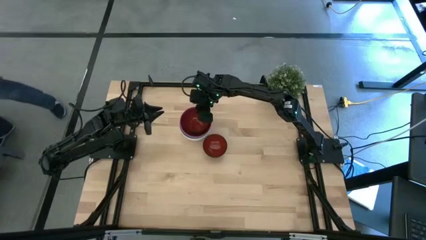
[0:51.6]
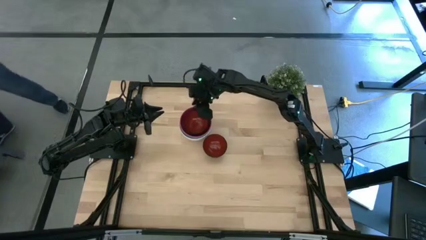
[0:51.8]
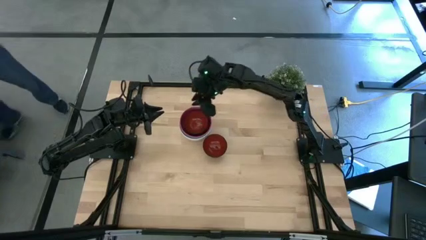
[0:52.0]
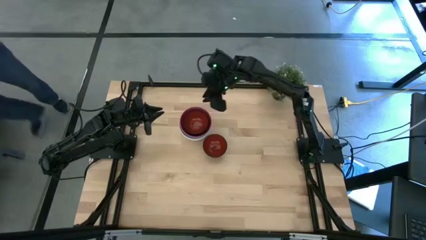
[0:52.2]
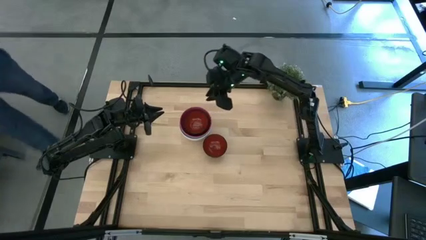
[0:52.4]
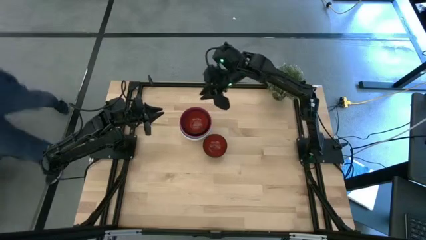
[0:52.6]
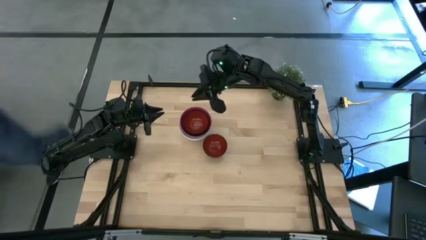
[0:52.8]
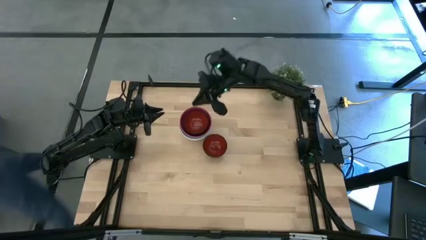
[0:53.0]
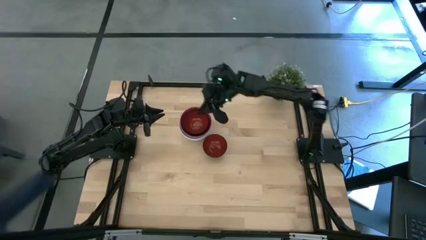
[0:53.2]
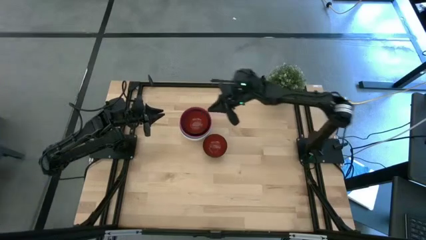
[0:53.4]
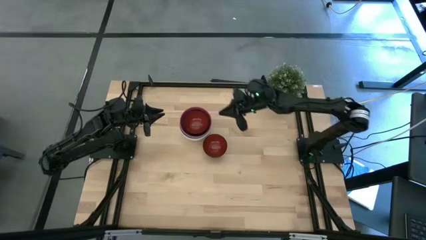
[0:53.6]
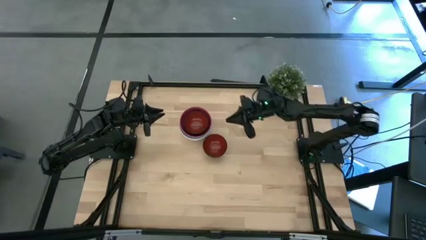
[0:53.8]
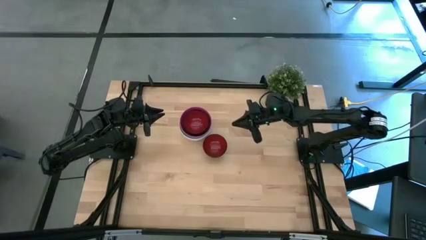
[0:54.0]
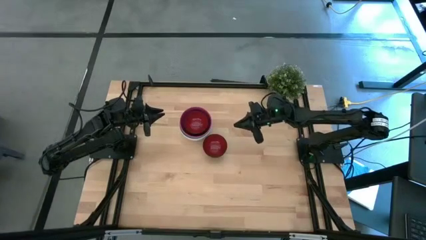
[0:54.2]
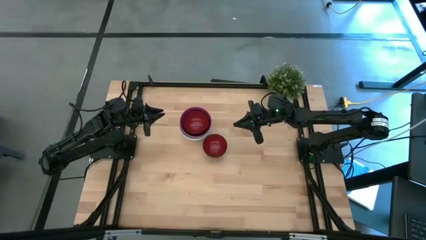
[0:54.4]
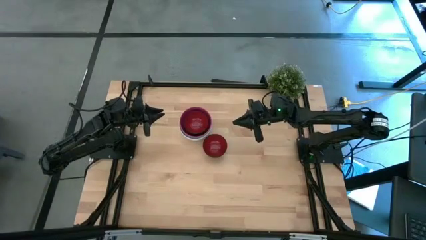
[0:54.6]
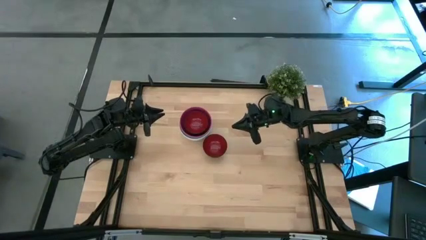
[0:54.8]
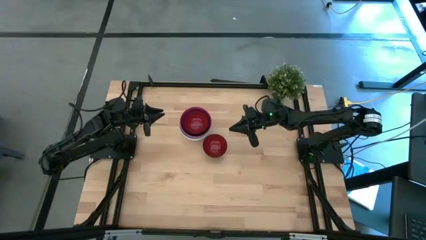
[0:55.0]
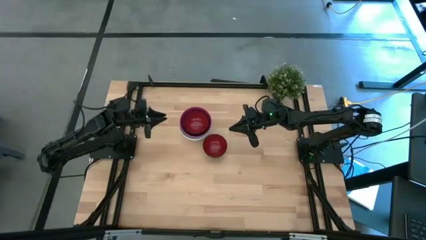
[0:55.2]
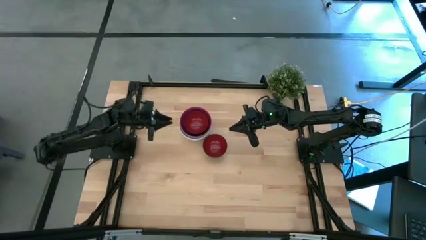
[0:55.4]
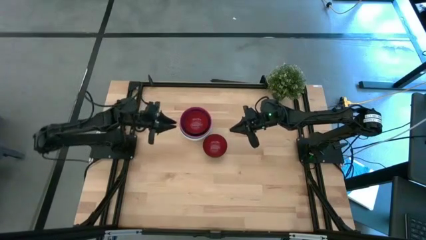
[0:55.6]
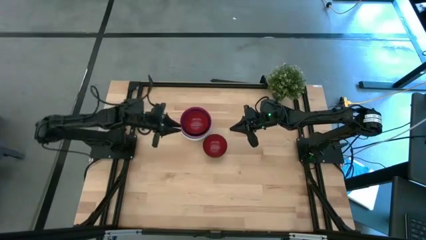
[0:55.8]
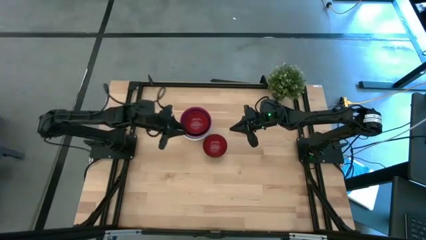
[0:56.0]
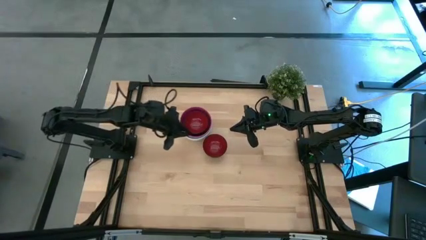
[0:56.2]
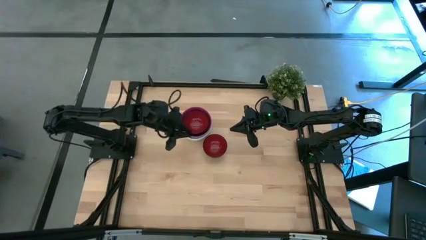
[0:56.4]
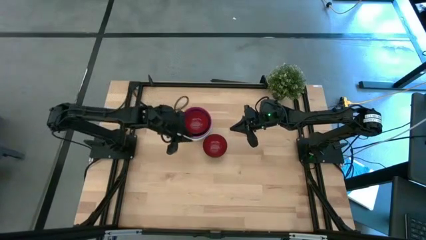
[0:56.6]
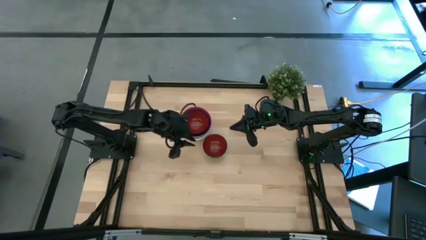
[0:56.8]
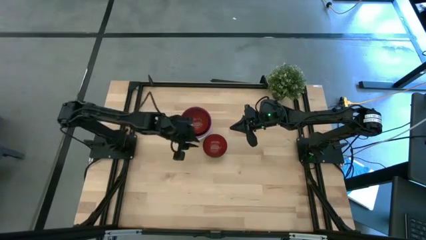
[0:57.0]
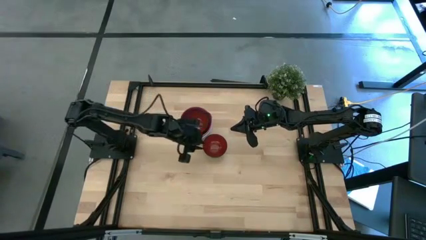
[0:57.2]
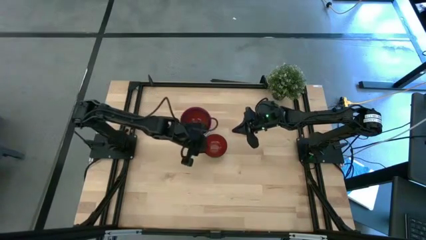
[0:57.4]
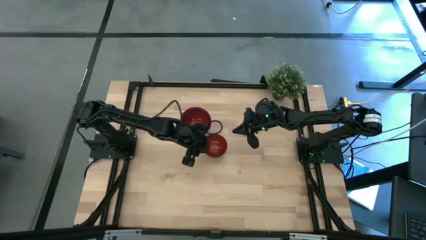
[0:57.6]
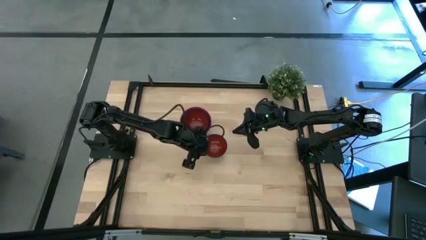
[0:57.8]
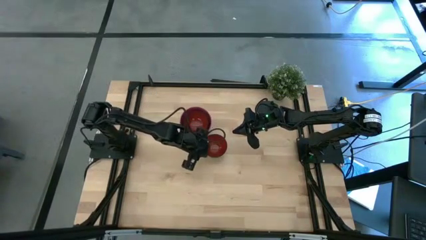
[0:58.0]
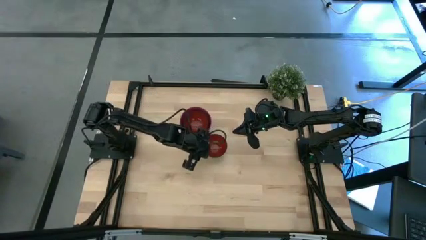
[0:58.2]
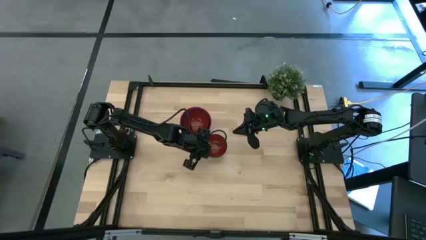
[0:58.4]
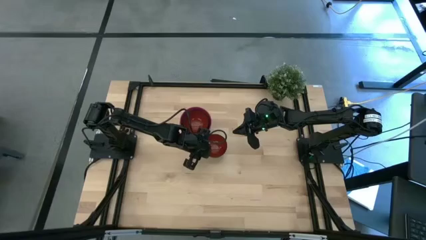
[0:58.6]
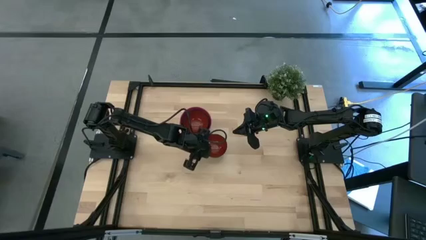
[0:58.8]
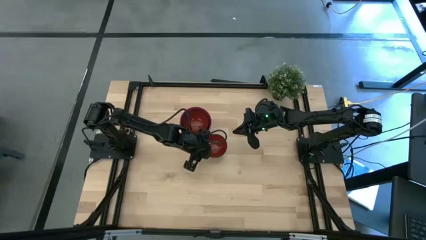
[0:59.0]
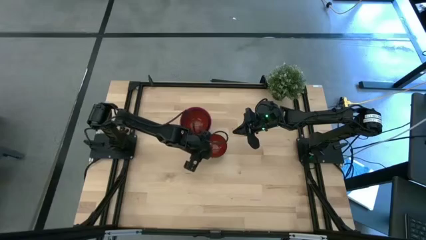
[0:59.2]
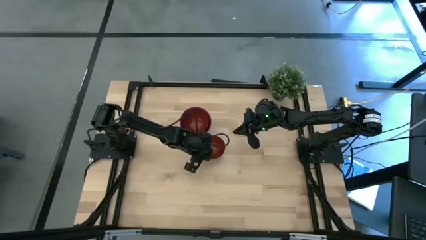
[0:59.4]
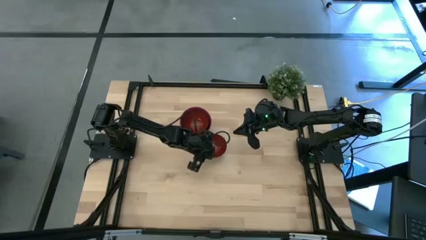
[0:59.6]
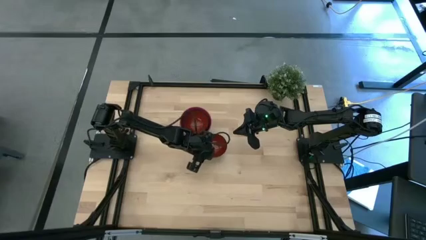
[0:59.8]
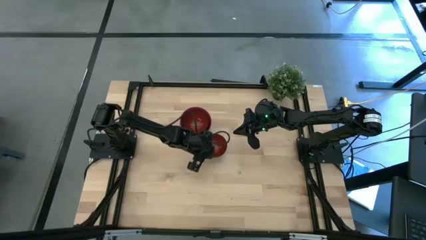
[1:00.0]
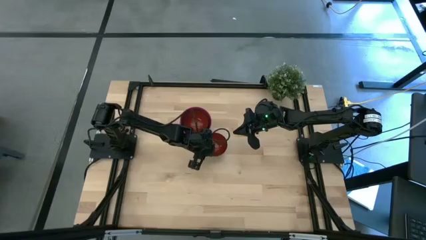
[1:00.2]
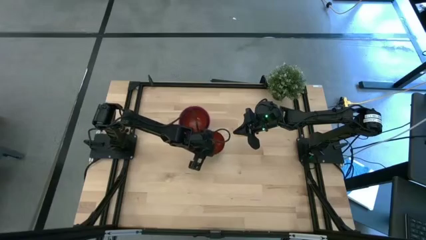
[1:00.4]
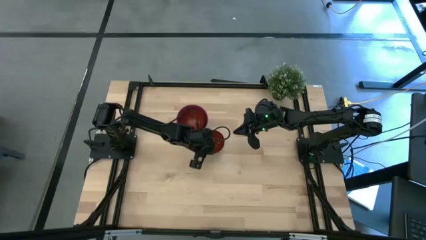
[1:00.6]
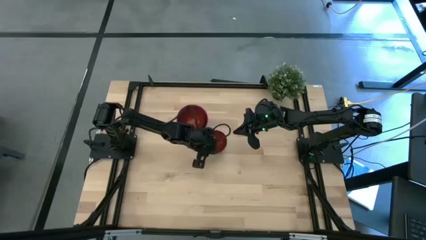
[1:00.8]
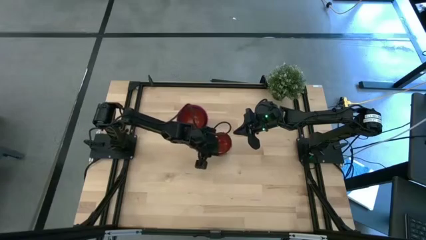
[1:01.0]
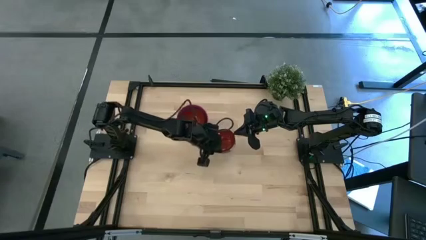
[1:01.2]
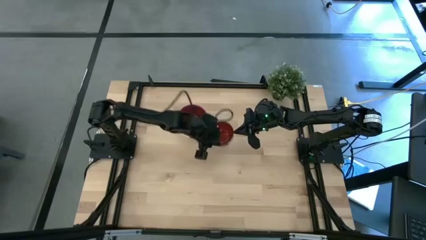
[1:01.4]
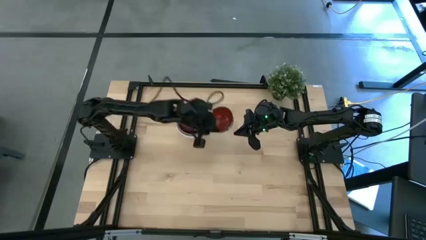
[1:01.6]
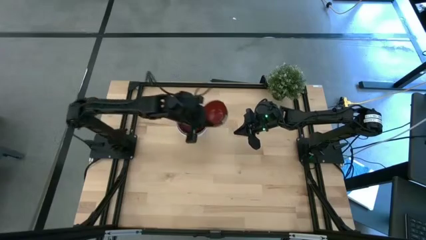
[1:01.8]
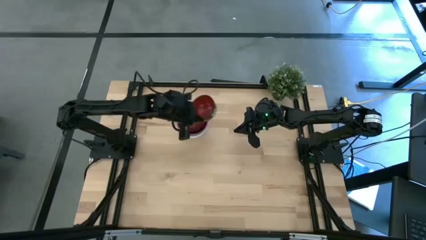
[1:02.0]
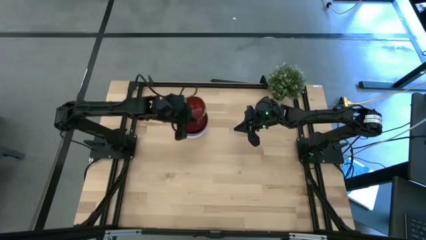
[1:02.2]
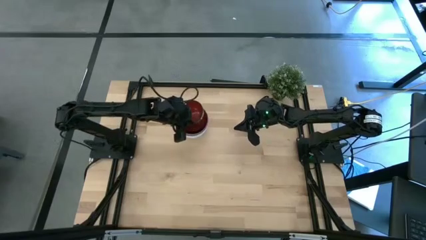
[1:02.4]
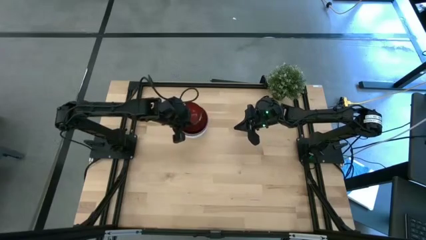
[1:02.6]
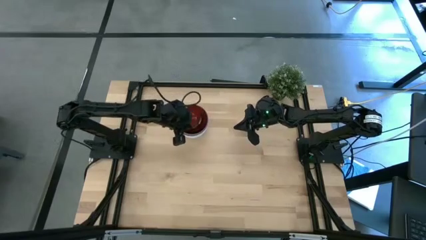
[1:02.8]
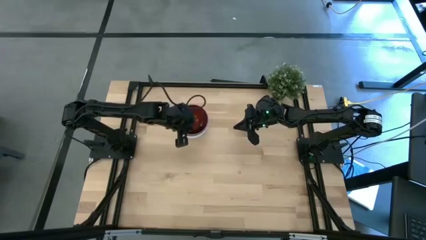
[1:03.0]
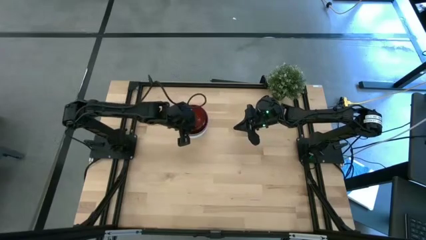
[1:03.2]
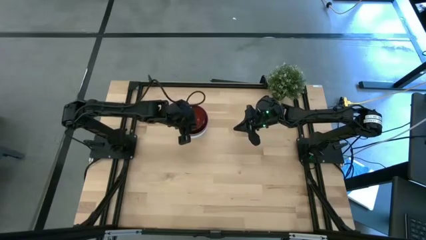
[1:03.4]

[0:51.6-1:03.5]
Task: Nest bowls inside each other
Stack the red bowl into the red bowl

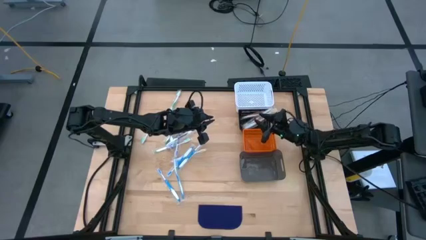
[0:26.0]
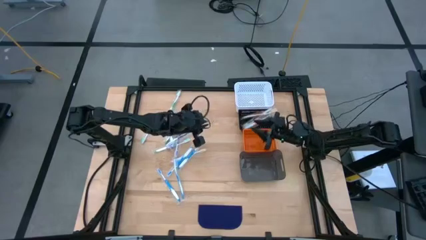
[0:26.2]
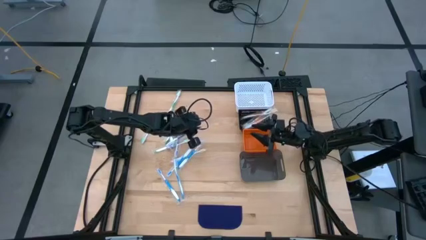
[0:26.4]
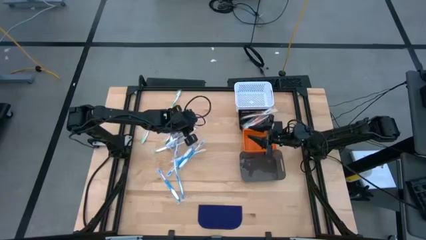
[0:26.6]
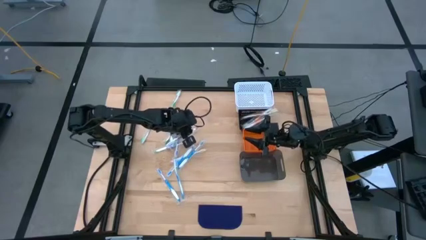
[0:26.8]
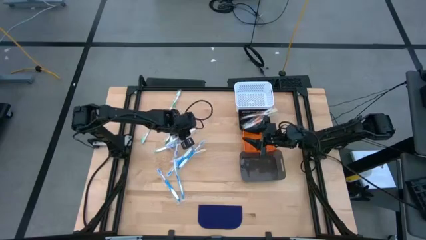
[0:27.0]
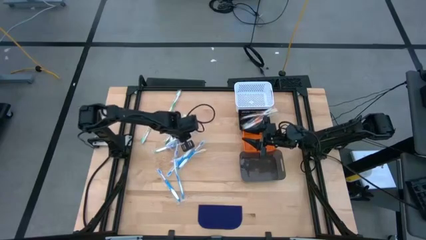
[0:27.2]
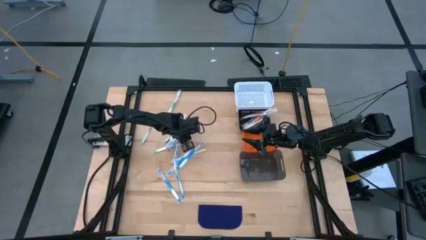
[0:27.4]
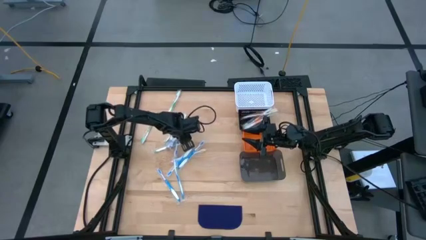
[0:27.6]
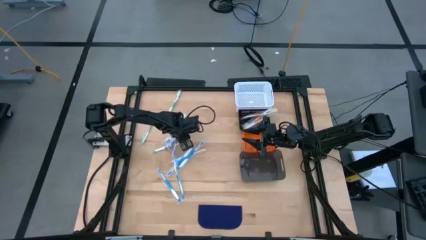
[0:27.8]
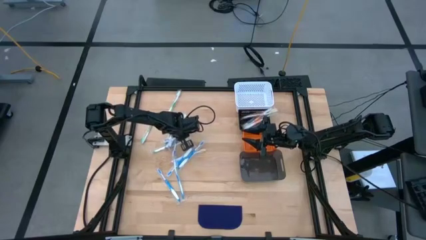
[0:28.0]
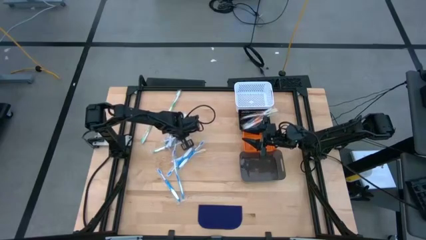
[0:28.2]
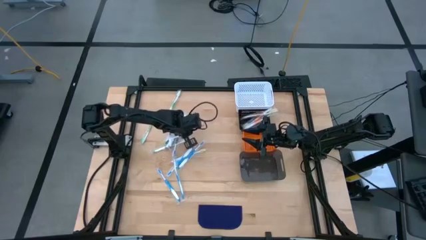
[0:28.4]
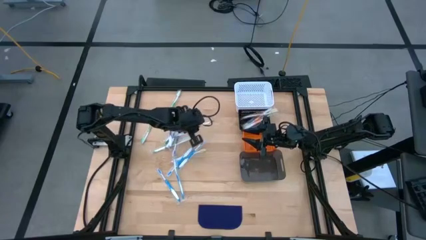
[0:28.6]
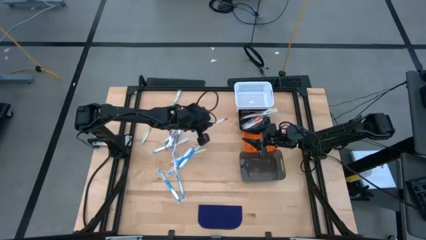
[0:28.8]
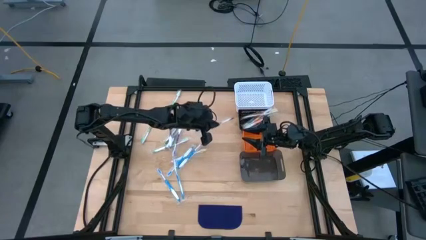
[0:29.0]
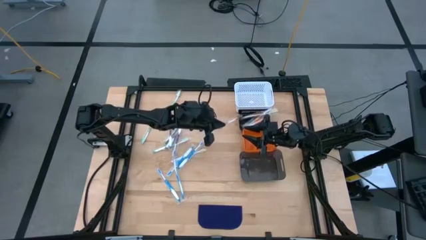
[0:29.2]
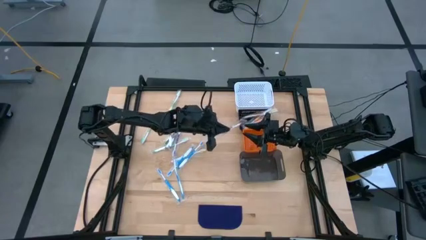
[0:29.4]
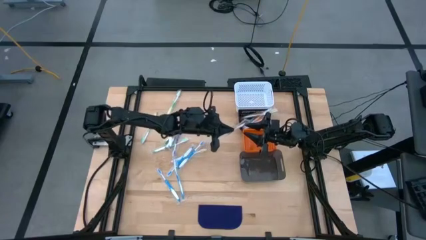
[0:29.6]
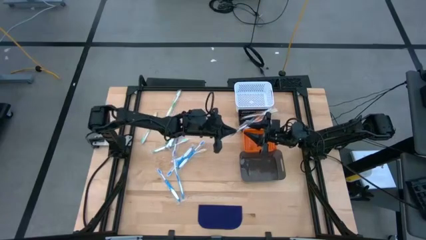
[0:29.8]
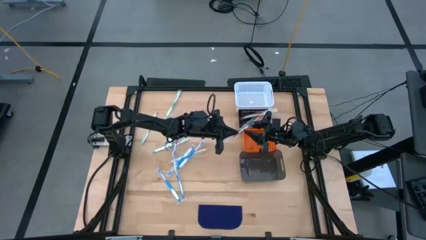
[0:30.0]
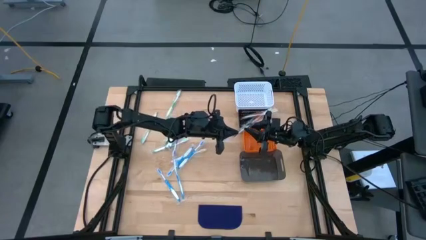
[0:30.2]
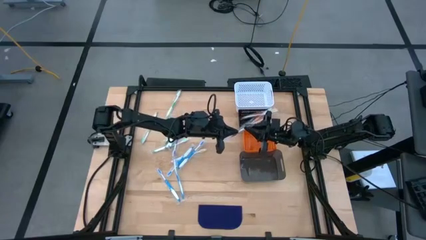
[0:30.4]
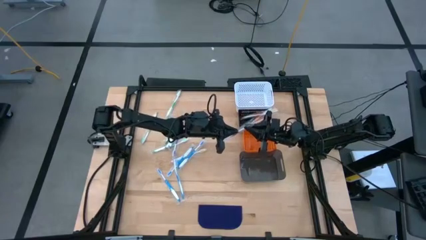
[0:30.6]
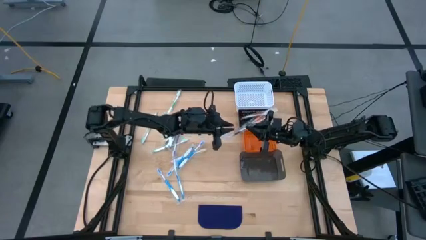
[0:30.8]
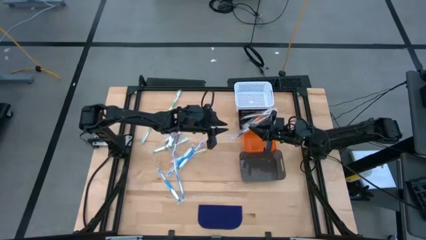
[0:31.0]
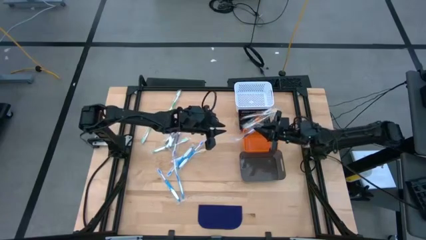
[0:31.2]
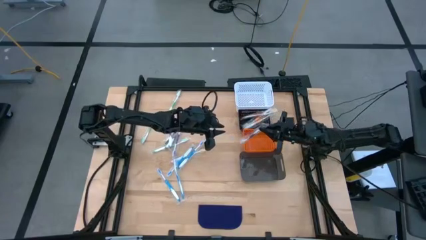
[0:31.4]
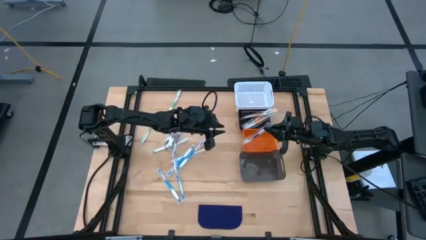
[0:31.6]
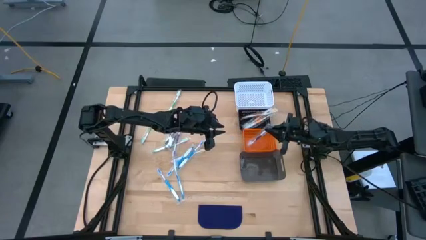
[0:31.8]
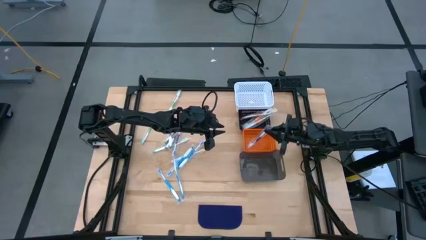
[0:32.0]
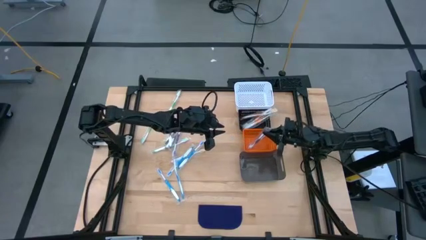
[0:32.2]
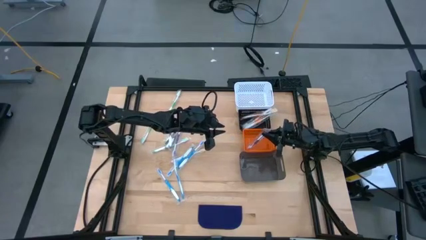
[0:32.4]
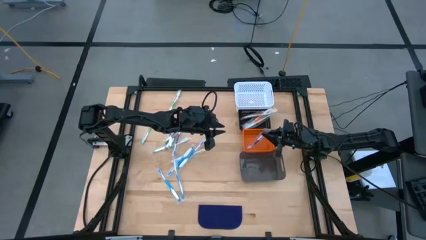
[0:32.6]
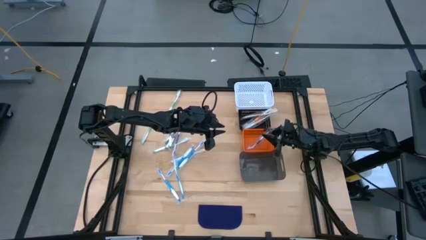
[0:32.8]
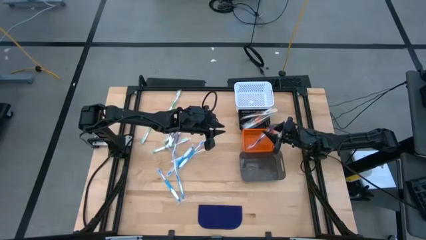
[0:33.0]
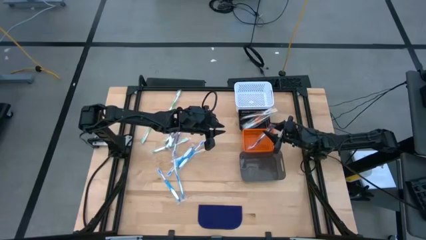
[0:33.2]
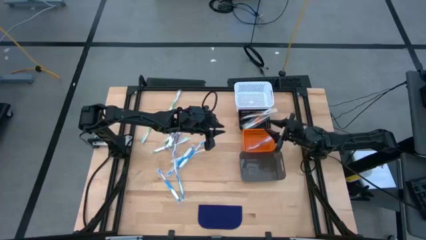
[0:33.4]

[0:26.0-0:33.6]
Task: Pick & Place Toothbrushes
Put the purple toothbrush into the orange bin
